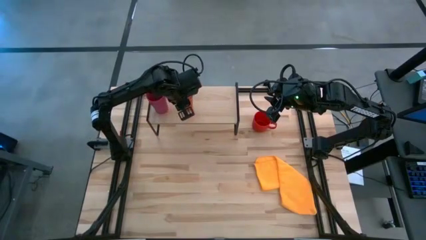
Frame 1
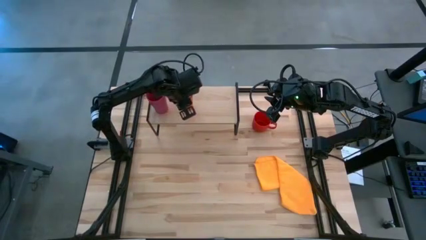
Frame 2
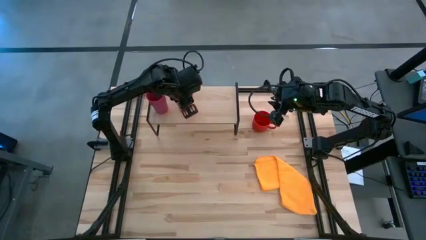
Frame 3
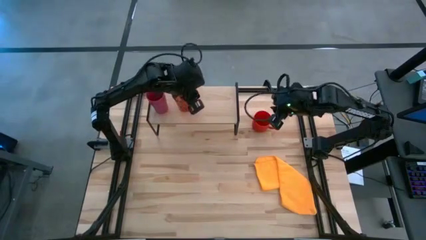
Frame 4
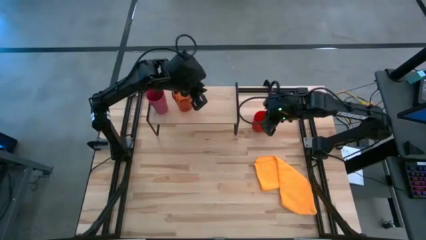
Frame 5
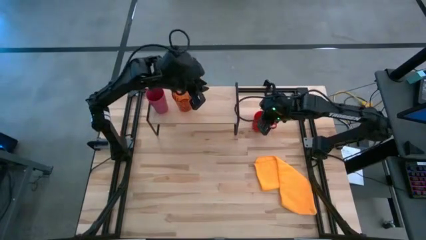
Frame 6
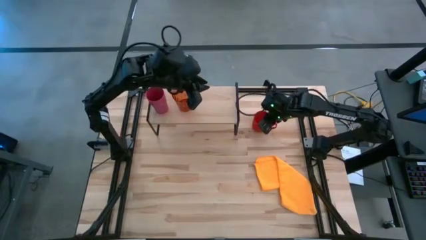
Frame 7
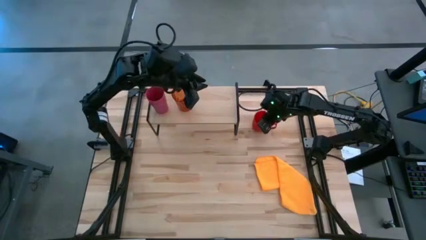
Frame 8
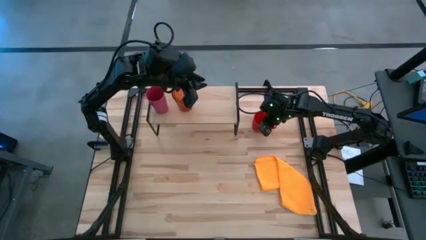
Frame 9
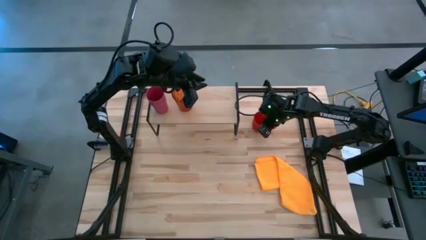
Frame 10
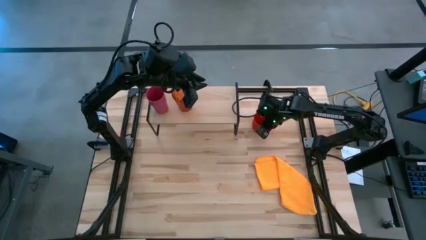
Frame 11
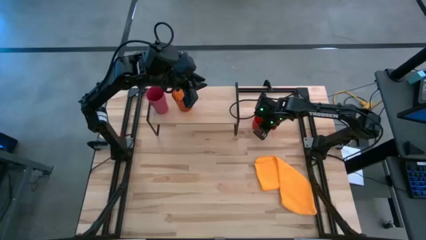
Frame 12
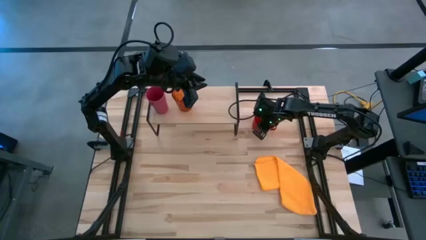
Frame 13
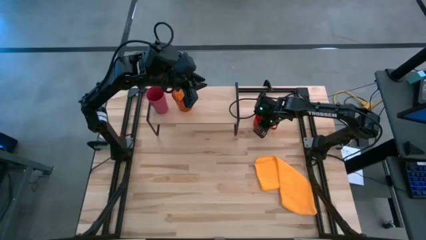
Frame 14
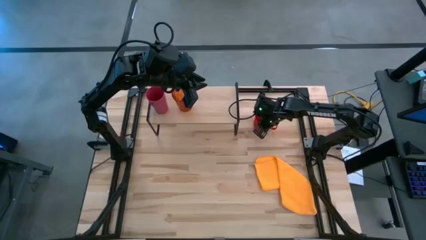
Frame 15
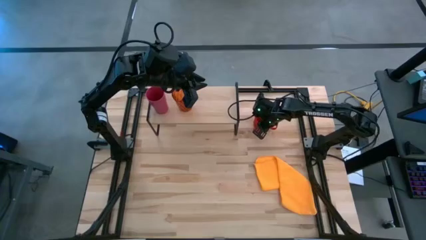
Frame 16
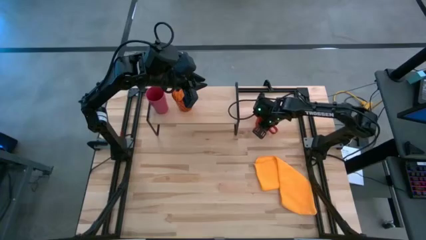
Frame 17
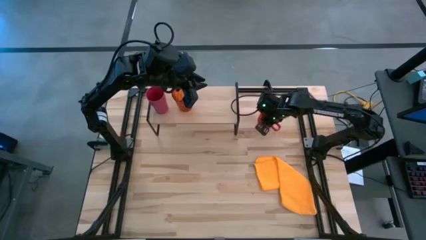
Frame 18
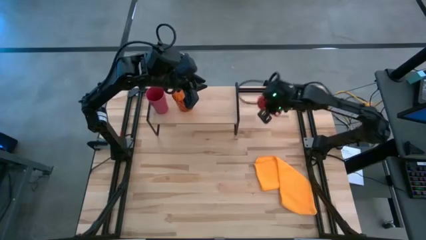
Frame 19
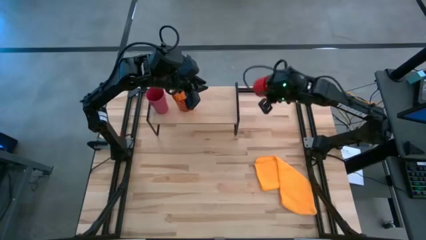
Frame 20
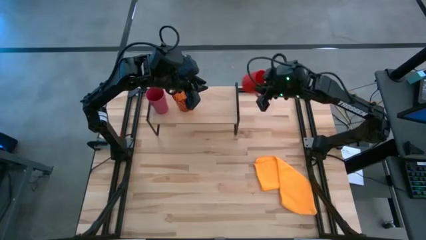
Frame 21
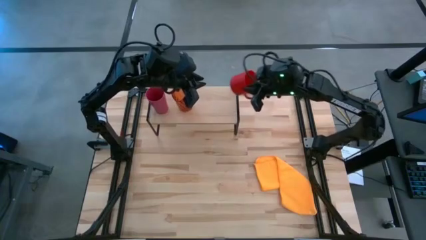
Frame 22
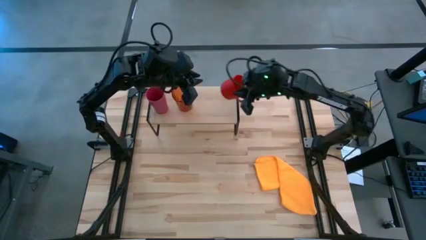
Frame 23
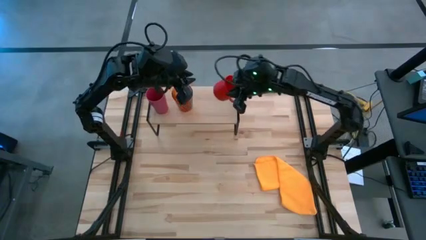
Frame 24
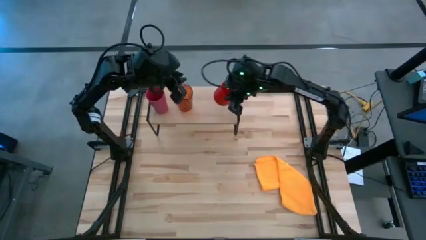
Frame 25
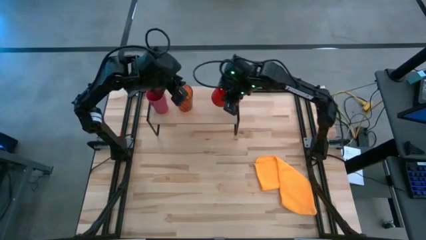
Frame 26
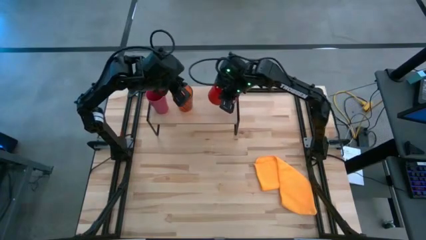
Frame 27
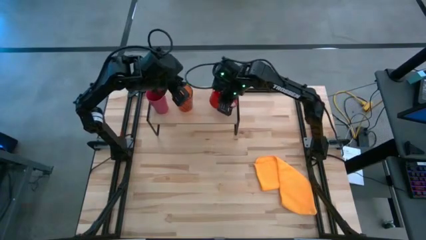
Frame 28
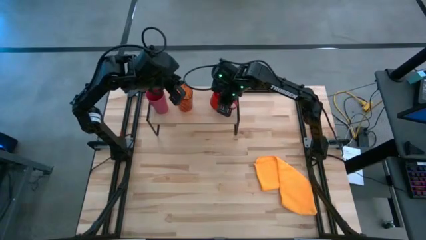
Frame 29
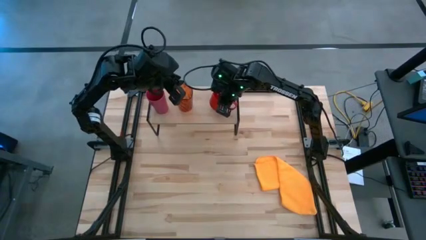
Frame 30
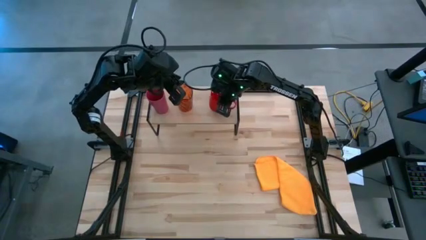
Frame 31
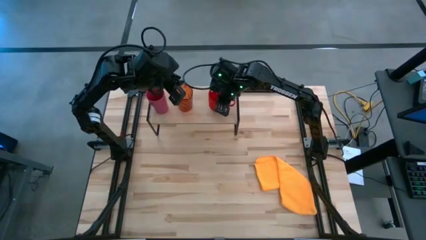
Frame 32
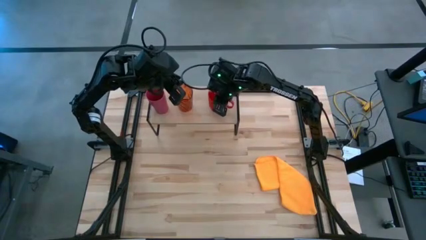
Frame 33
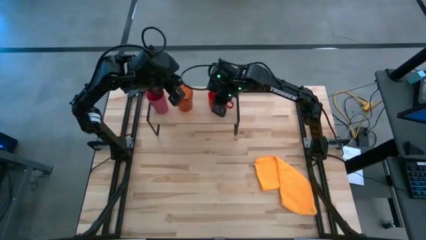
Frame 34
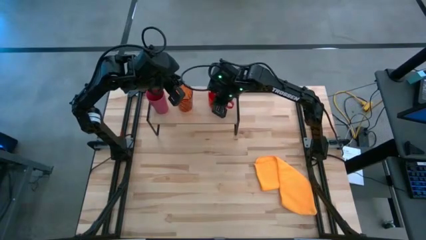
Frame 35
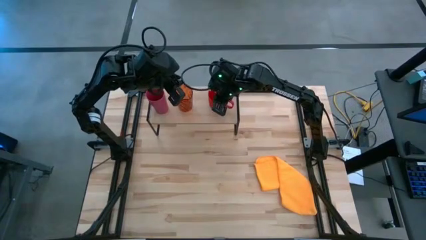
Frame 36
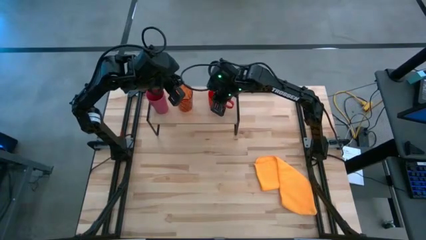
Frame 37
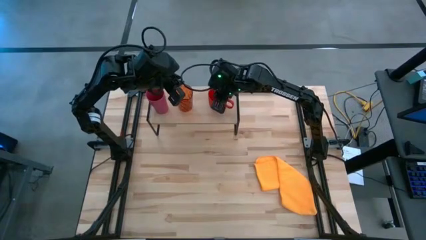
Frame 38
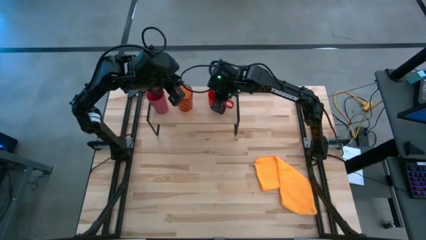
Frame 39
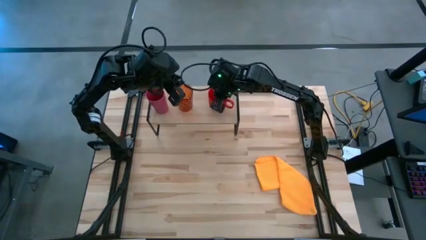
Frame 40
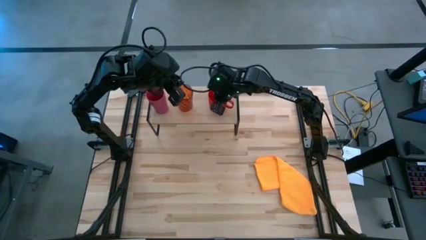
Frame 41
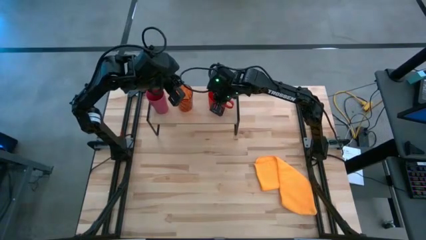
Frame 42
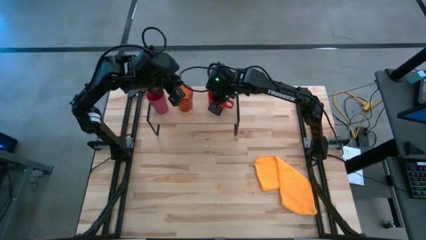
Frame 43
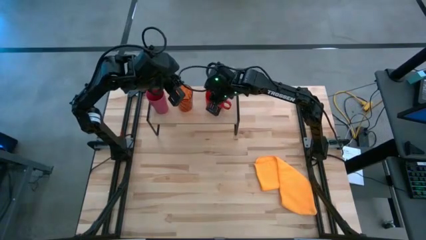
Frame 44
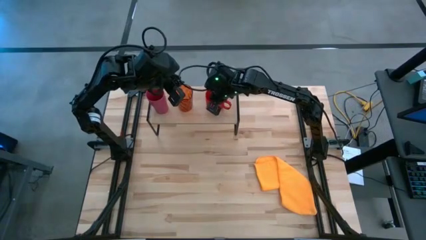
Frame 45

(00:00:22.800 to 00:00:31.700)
Task: Stack small to large cups/mugs on shelf
Put the red mug on the shelf

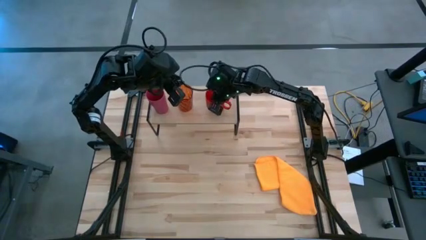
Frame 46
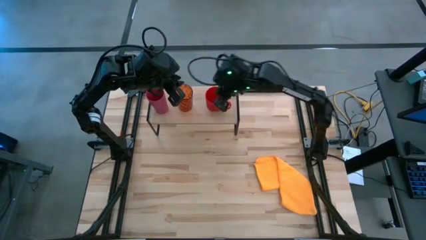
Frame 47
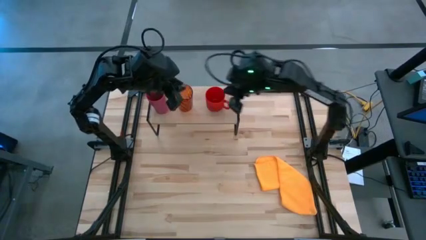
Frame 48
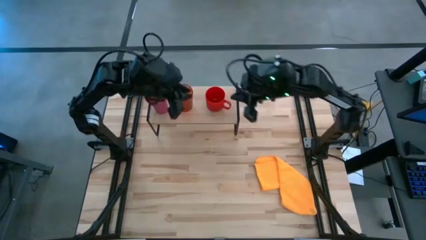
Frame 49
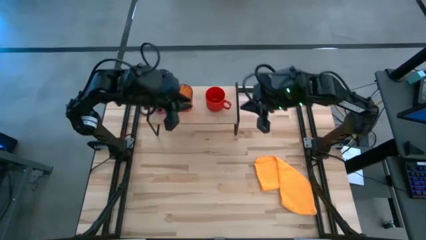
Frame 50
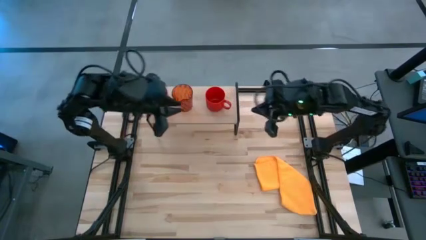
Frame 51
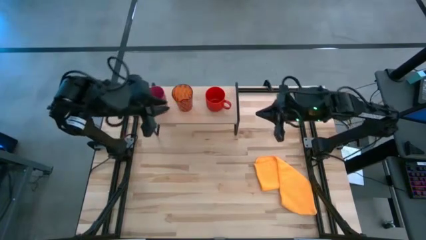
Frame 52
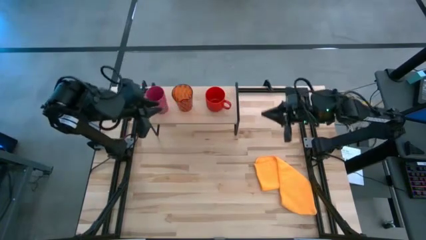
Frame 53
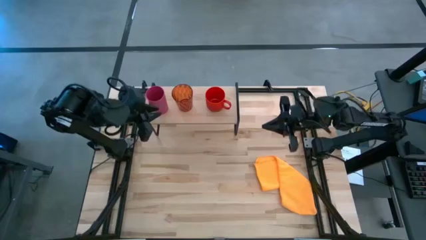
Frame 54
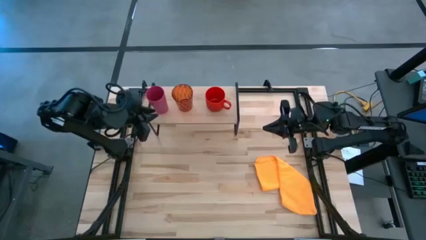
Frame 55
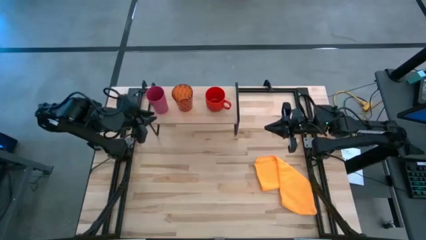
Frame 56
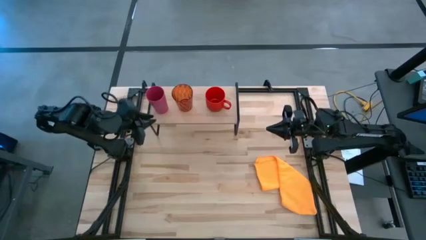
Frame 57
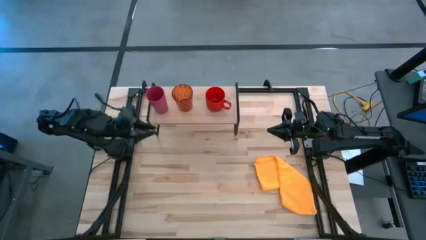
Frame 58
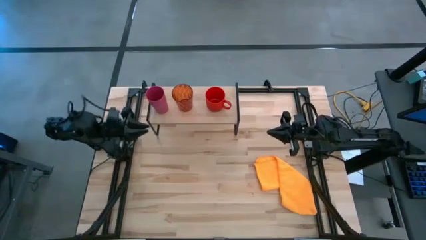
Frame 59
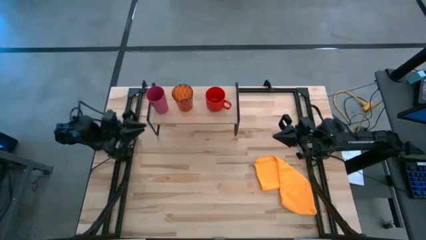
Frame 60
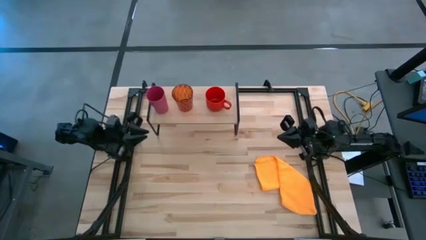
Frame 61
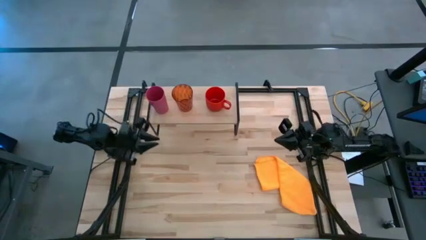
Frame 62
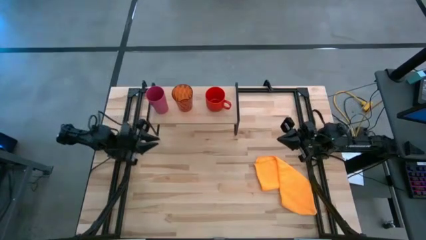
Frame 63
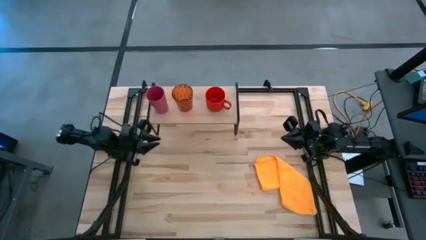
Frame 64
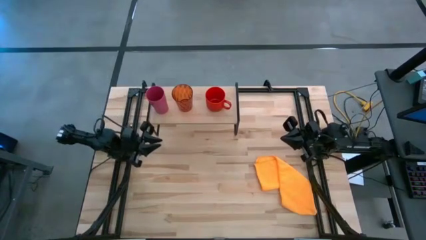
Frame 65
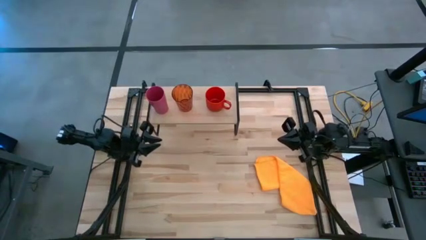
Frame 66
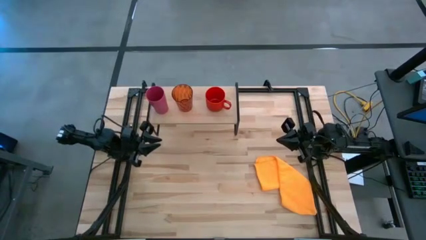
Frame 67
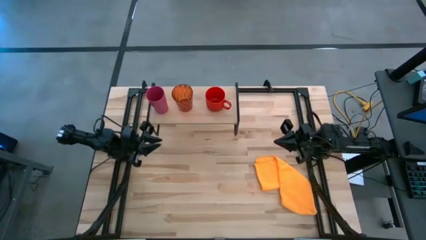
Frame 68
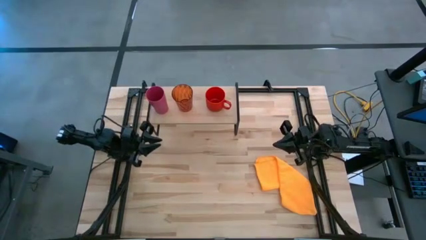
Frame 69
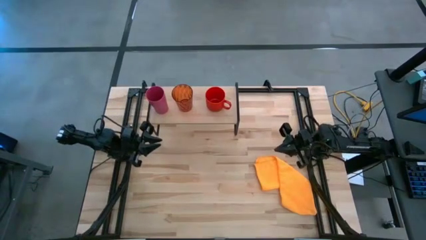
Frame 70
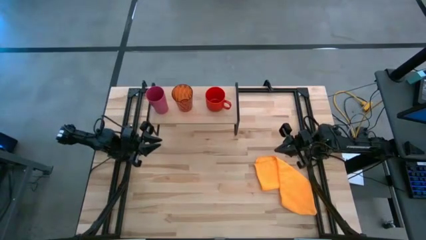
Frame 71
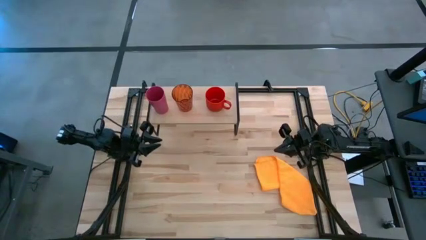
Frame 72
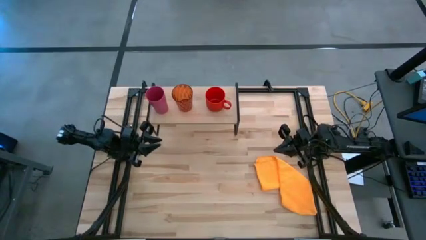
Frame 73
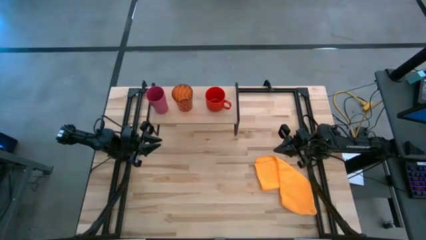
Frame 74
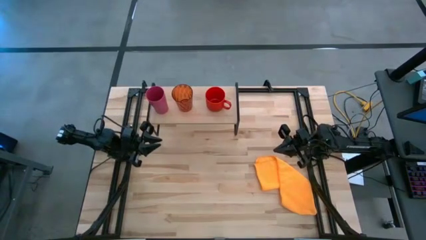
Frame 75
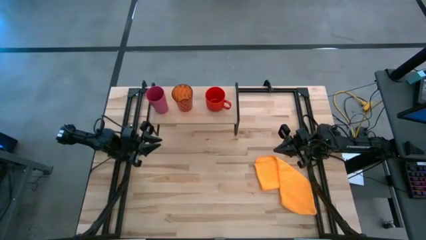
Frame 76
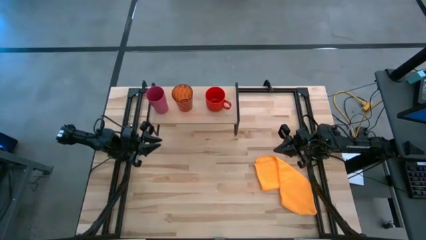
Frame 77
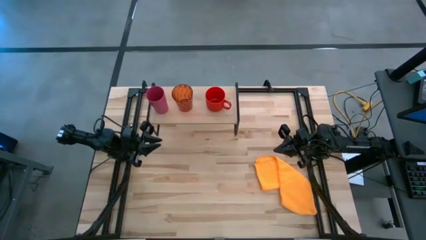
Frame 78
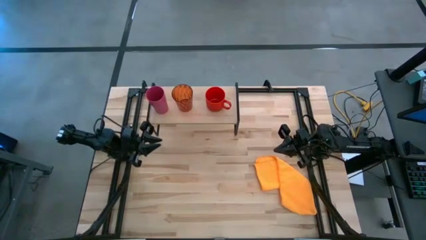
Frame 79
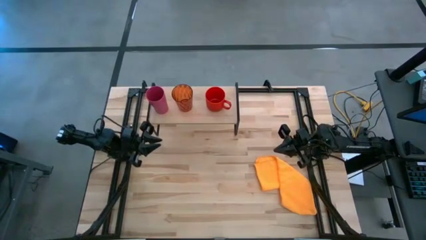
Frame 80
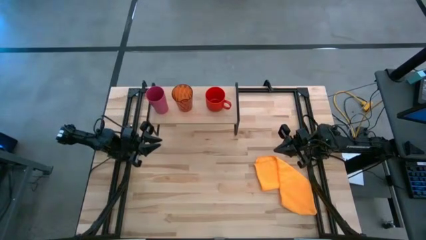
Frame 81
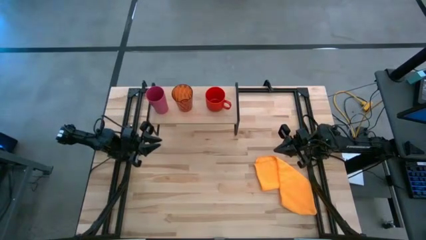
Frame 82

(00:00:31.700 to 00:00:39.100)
Return to Home Position
